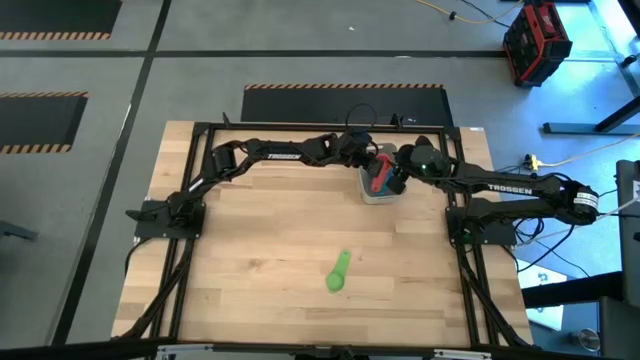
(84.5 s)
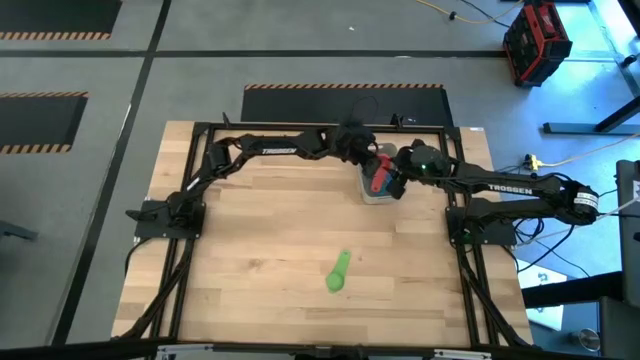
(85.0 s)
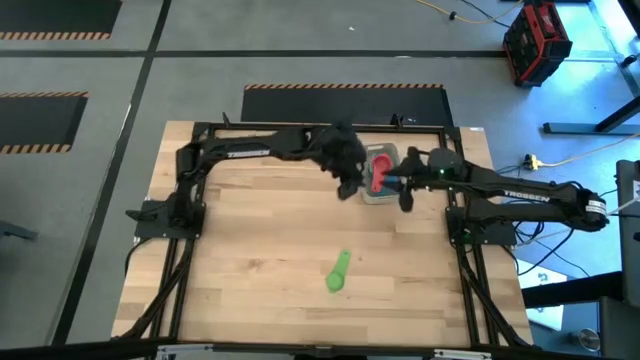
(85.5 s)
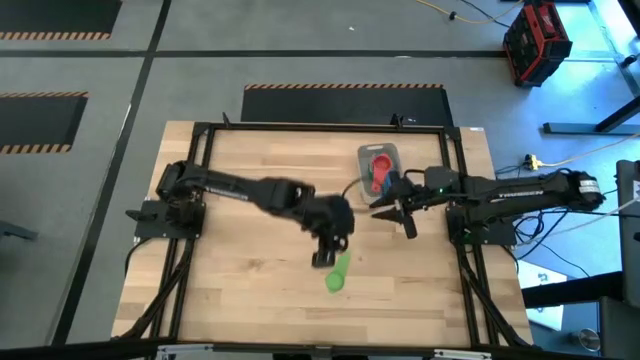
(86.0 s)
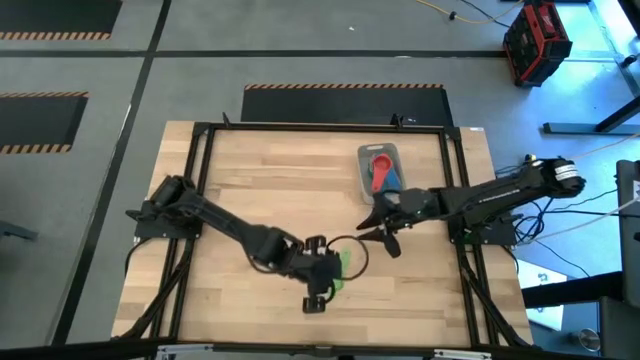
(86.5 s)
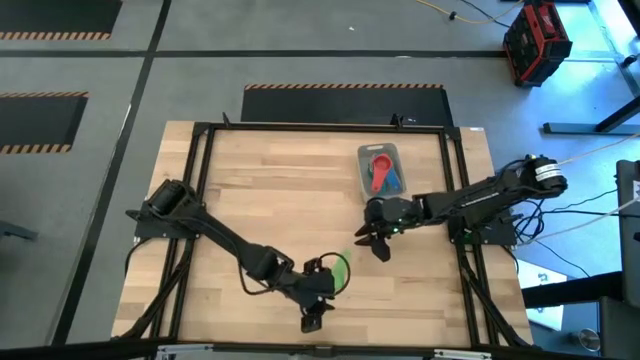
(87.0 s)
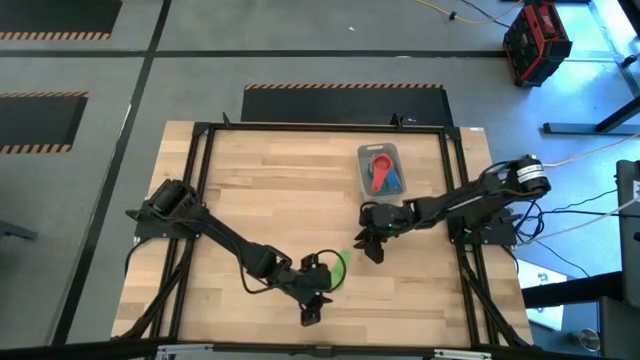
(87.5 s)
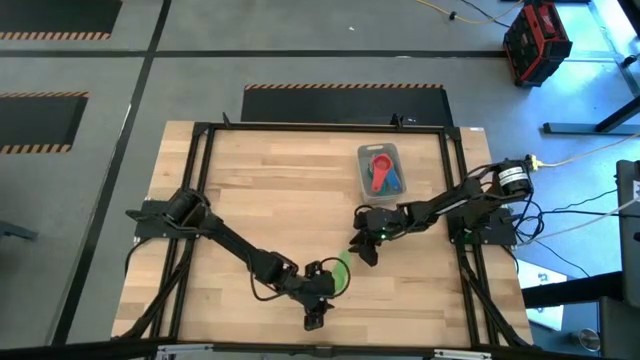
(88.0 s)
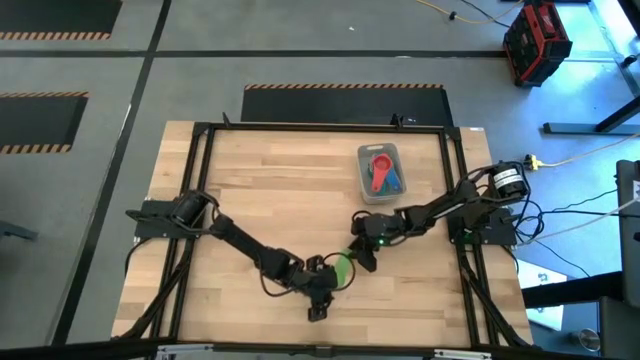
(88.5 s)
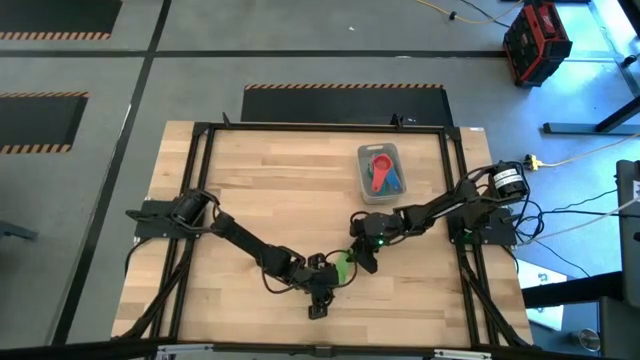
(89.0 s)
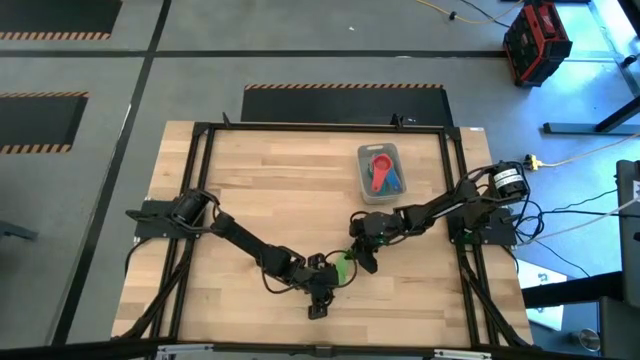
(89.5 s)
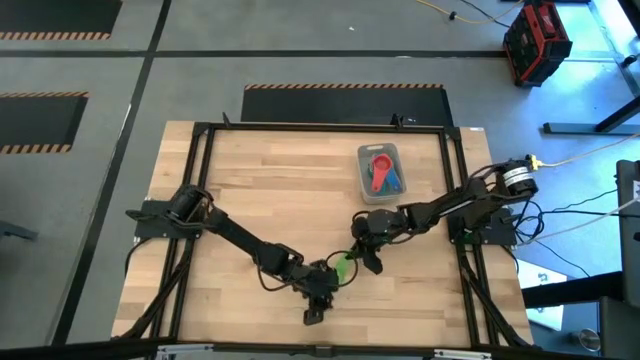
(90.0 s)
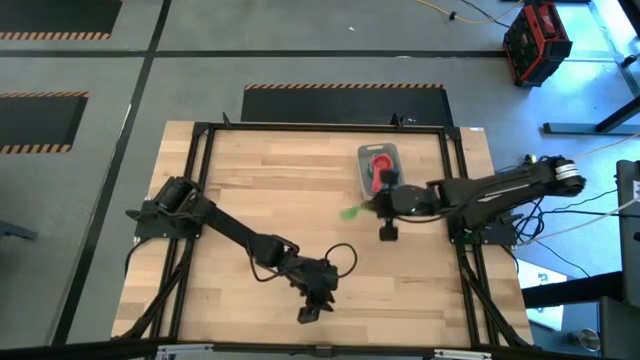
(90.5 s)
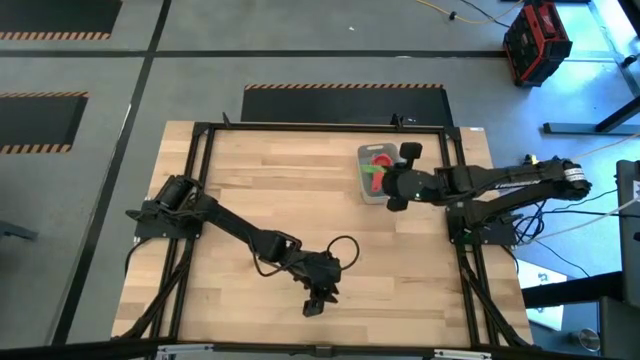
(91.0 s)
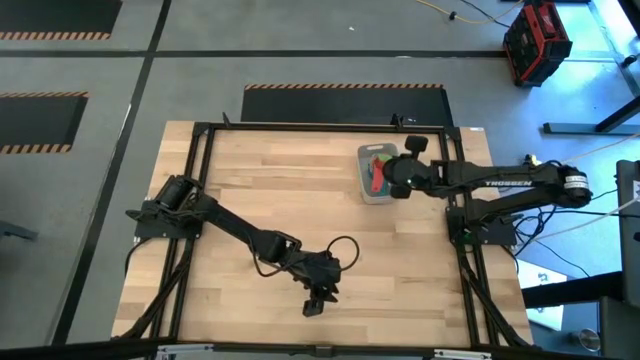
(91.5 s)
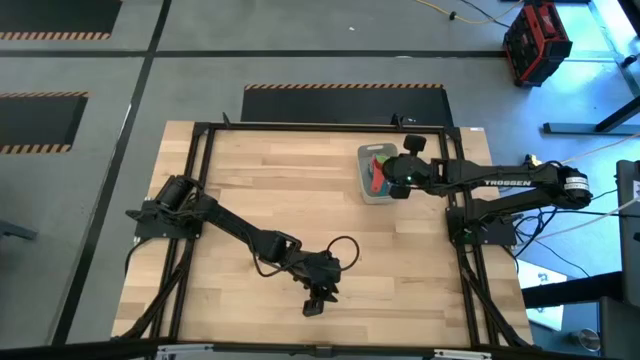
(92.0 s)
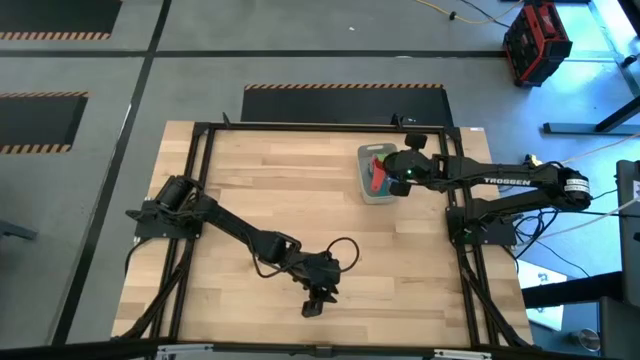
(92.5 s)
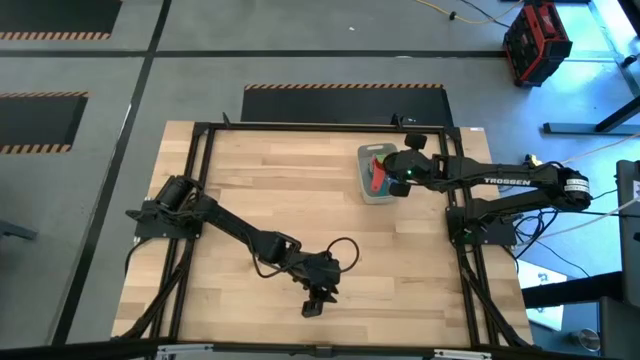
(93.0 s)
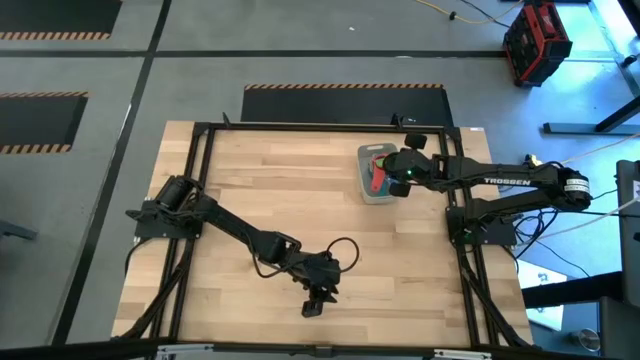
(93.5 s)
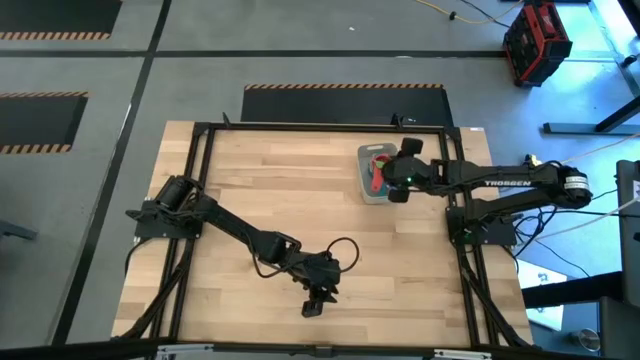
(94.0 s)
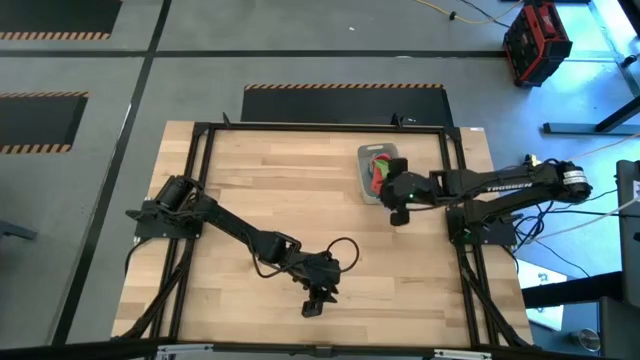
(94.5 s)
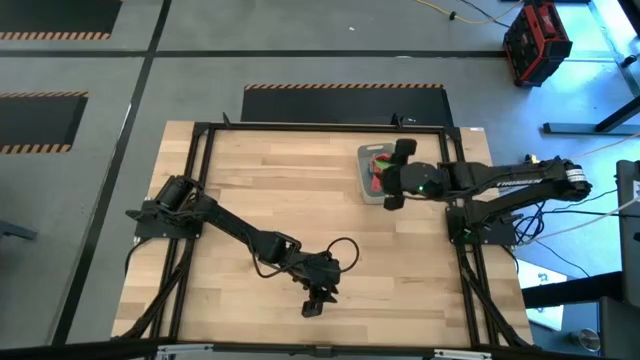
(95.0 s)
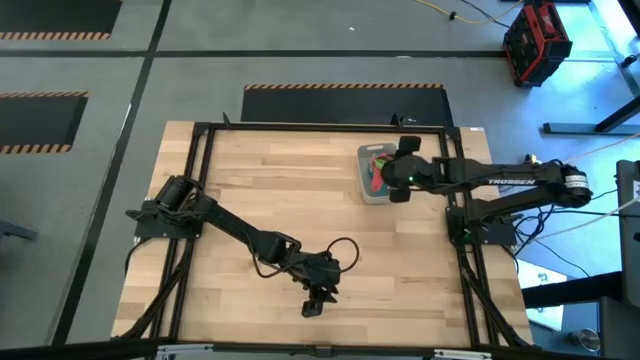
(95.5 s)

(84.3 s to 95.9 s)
Task: Nest measuring cups in basket
Stack the green measuring cup on top of the red measuring cup in the grey bin

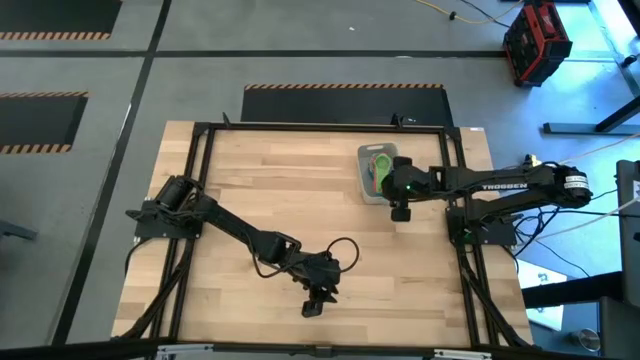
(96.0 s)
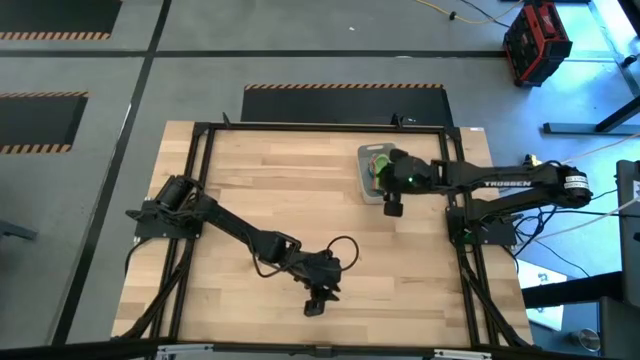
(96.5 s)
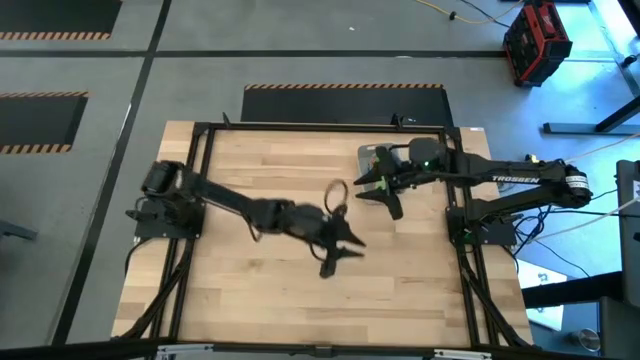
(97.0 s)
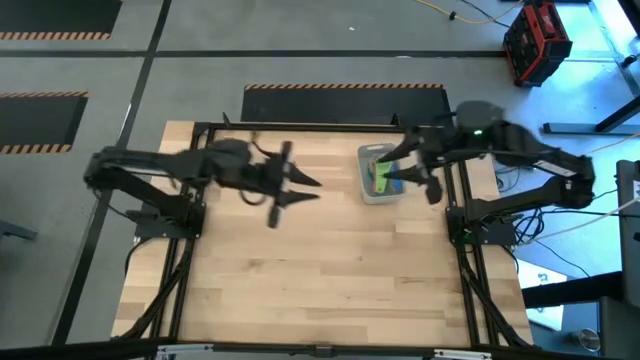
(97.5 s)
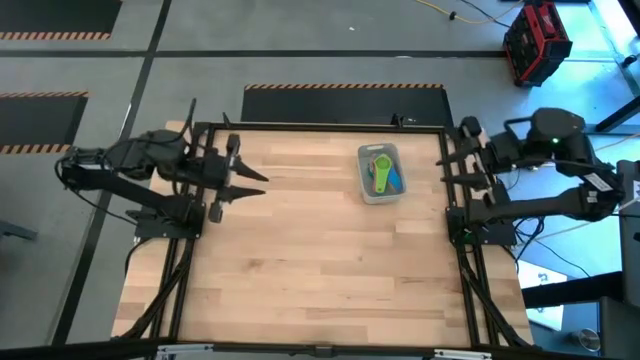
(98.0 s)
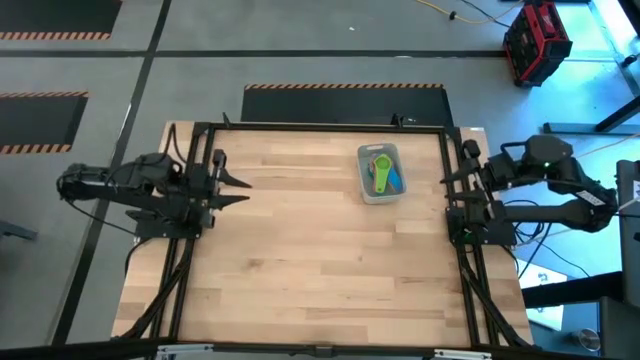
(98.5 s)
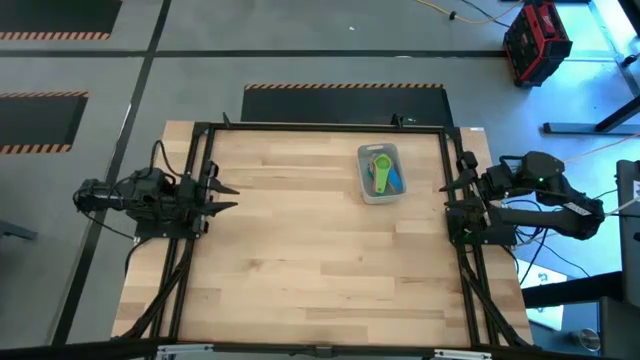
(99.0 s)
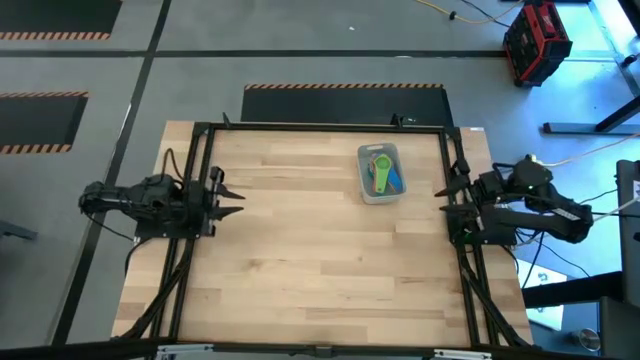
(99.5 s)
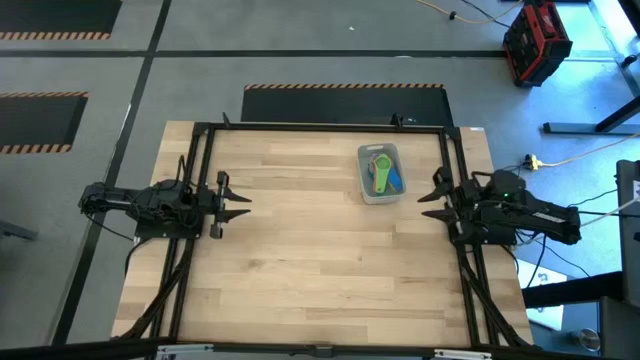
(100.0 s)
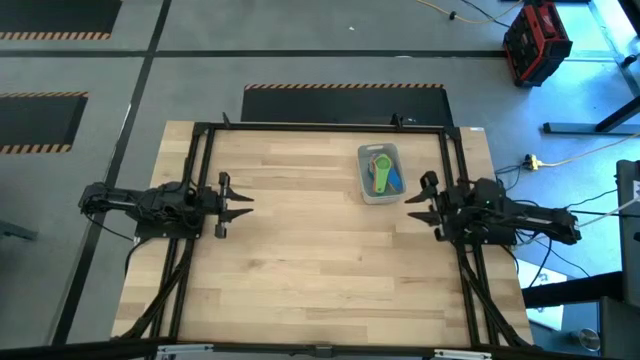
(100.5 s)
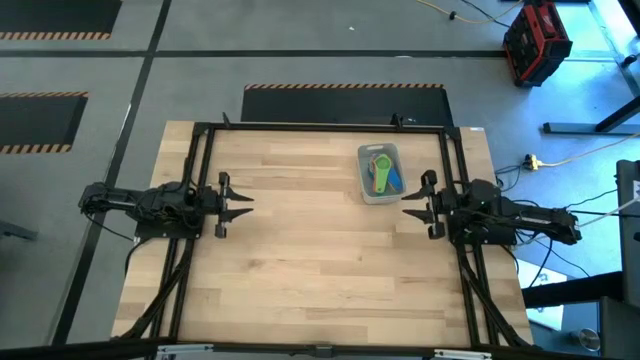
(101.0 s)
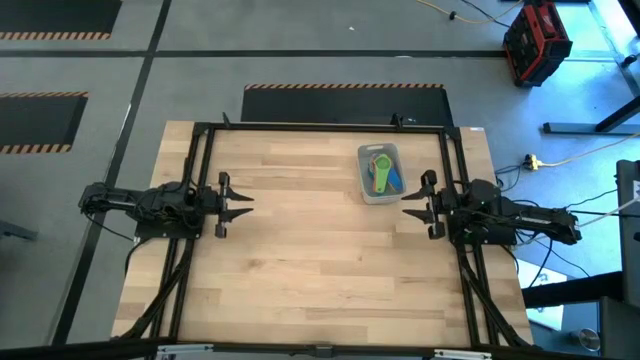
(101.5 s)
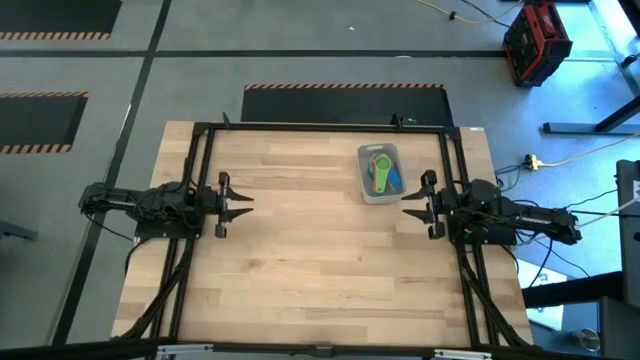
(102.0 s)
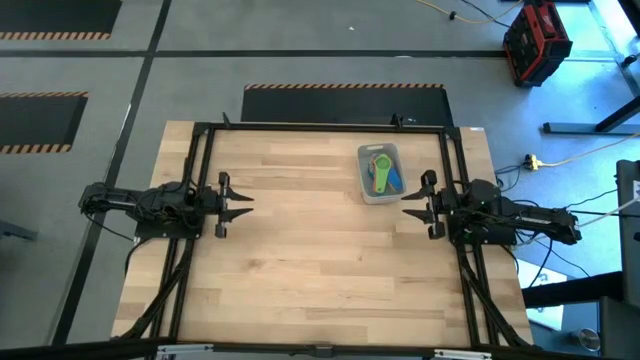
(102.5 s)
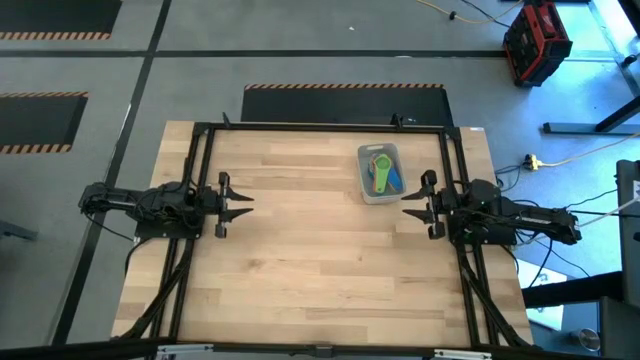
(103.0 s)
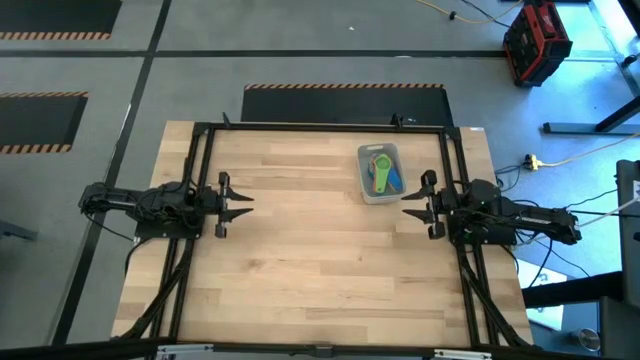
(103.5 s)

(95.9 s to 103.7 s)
Return to Home Position

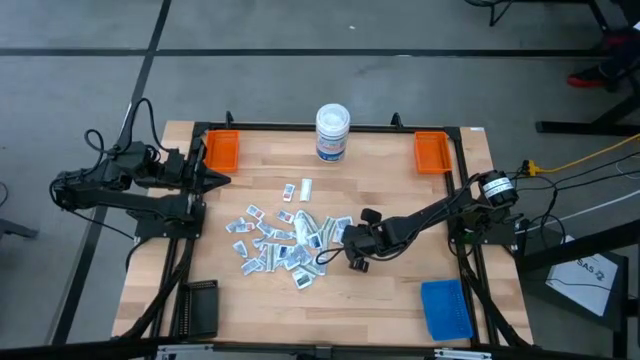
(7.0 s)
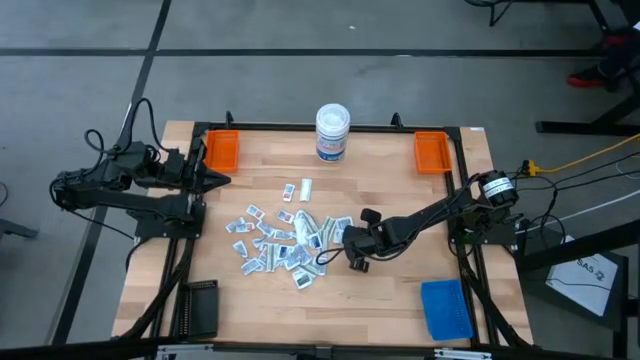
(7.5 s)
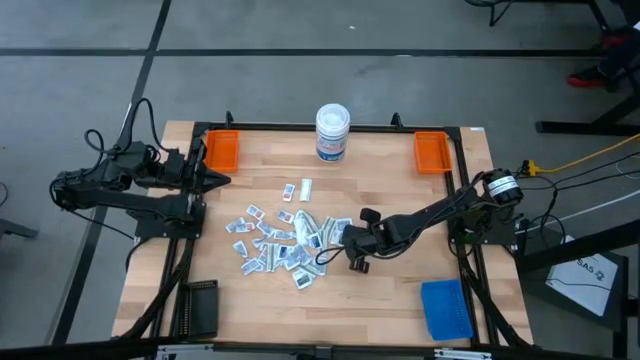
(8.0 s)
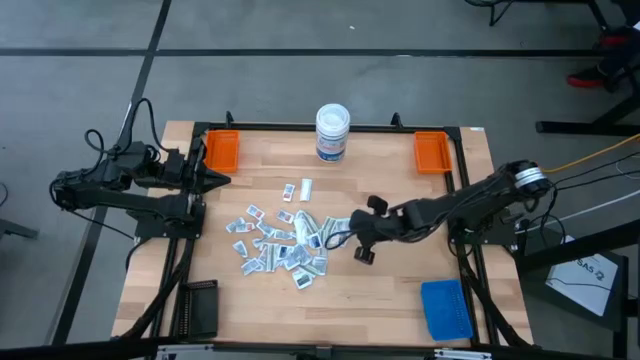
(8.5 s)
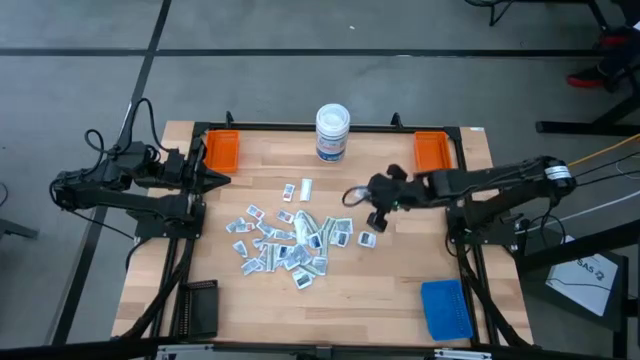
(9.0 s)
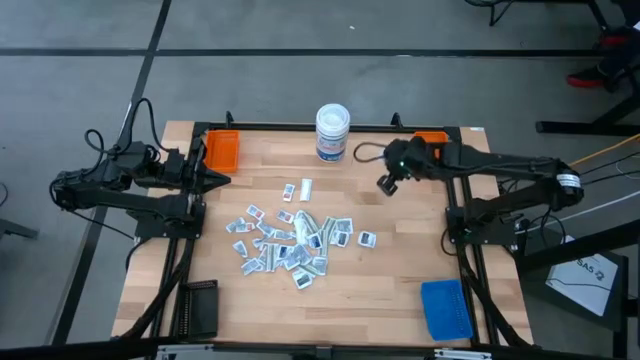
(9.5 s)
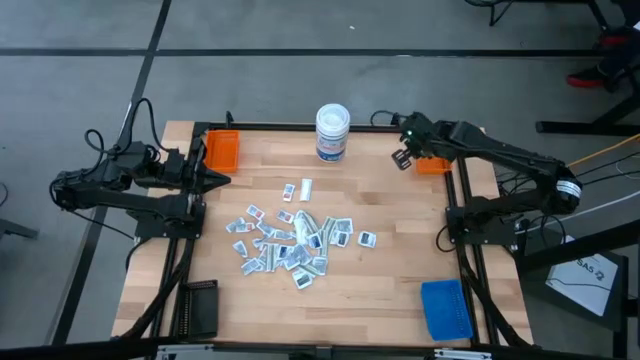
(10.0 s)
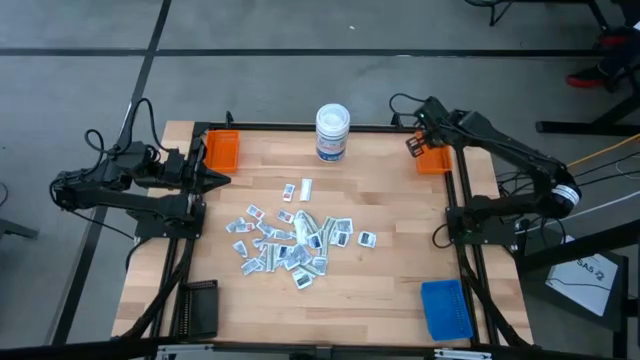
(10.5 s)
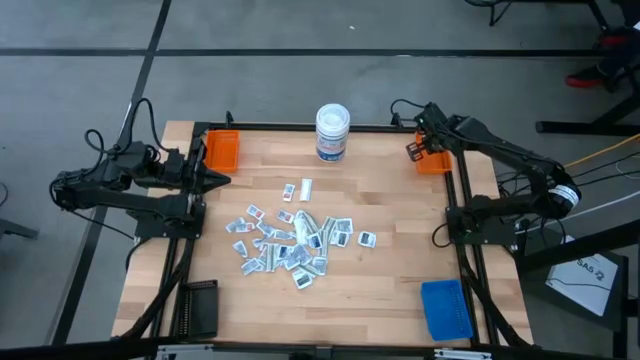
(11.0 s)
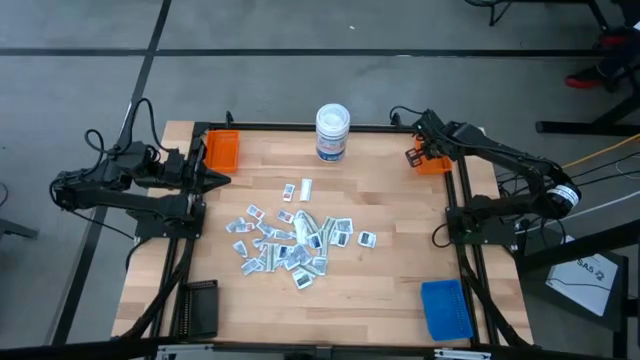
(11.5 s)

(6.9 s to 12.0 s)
Task: Pick & Place First Aid Supplies
Put the gray towelette pack into the right orange bin
